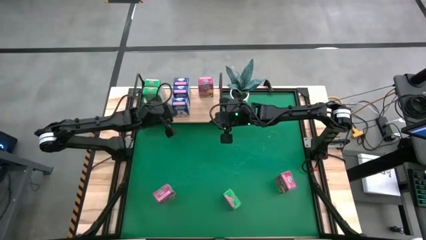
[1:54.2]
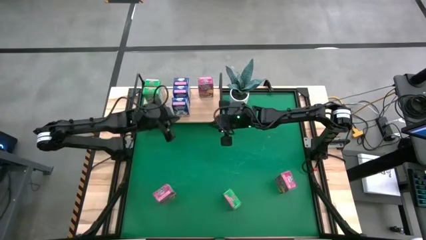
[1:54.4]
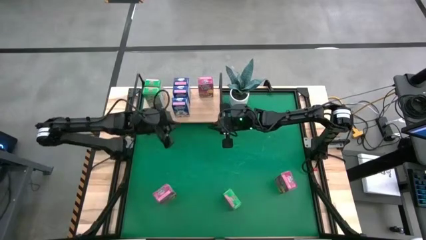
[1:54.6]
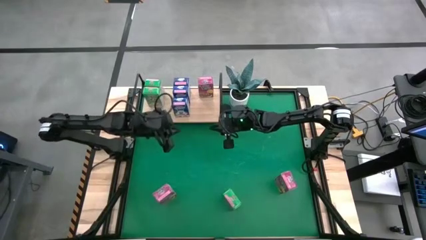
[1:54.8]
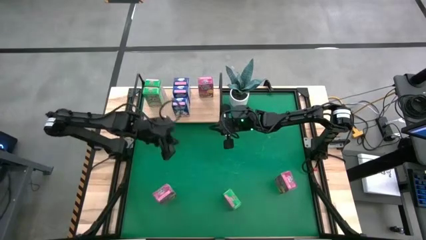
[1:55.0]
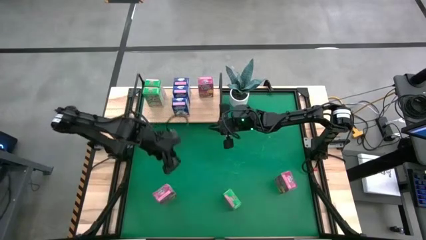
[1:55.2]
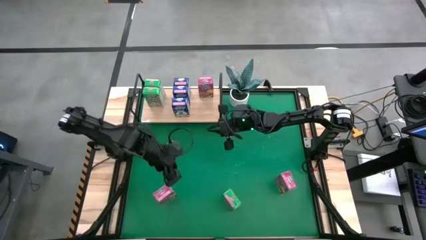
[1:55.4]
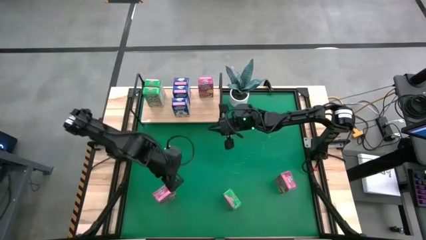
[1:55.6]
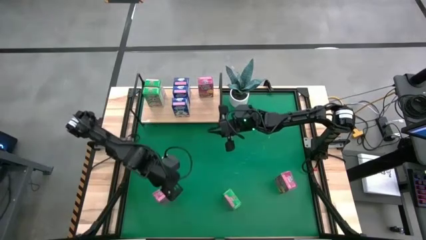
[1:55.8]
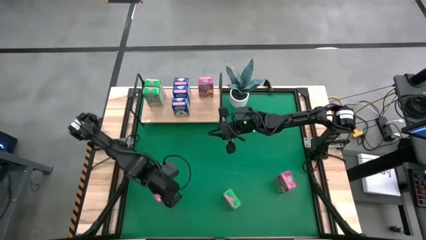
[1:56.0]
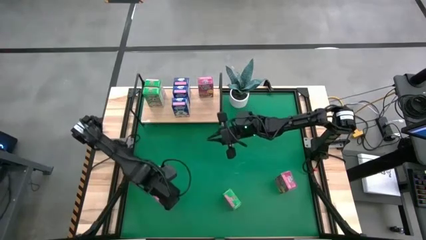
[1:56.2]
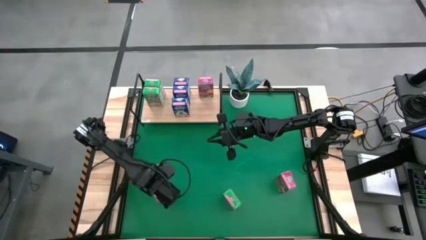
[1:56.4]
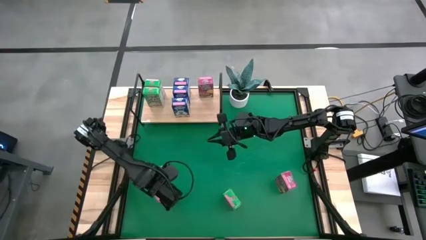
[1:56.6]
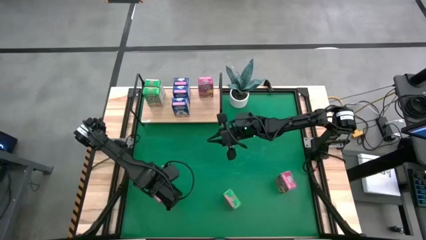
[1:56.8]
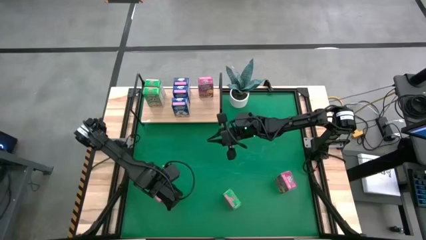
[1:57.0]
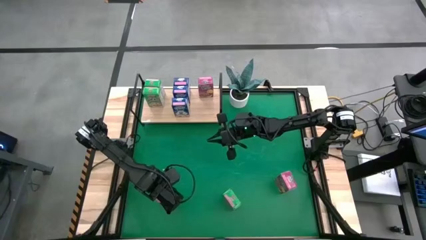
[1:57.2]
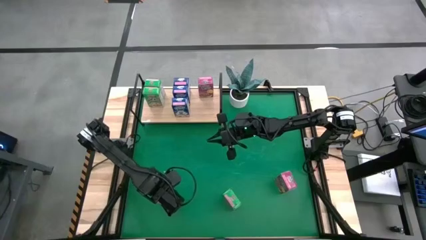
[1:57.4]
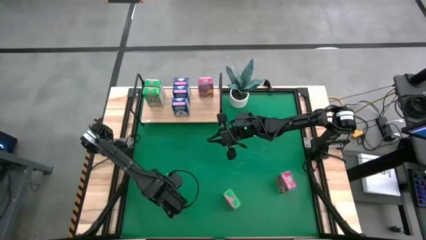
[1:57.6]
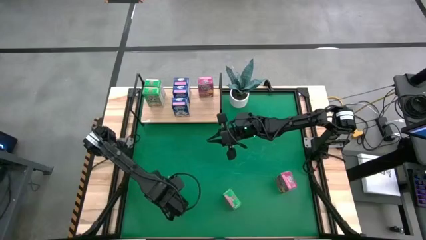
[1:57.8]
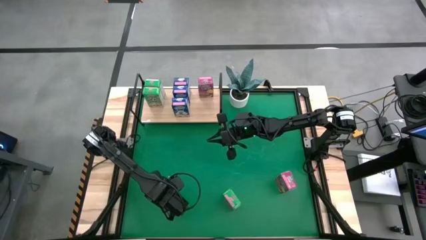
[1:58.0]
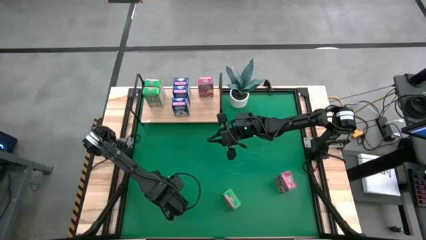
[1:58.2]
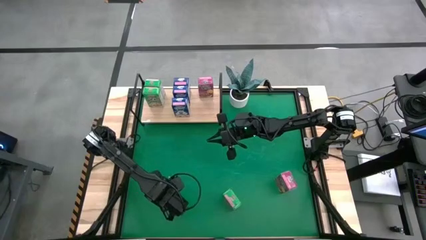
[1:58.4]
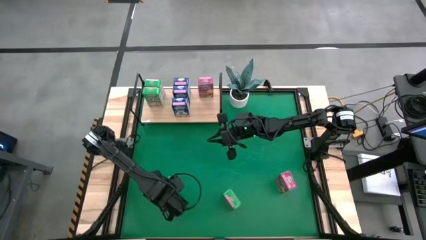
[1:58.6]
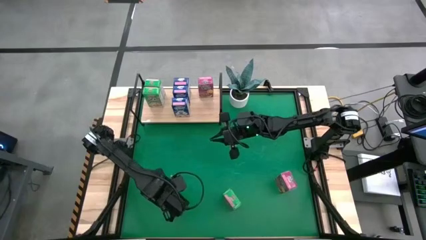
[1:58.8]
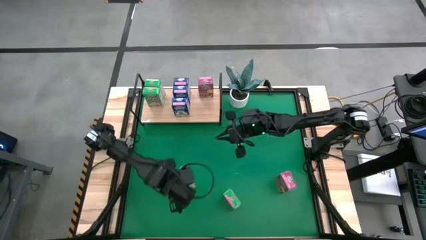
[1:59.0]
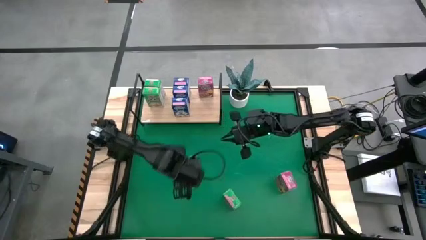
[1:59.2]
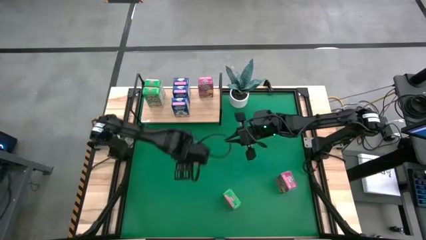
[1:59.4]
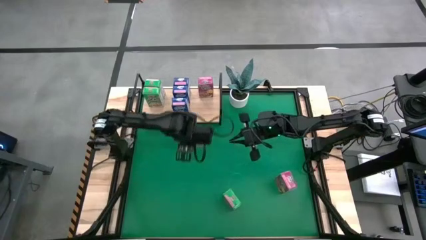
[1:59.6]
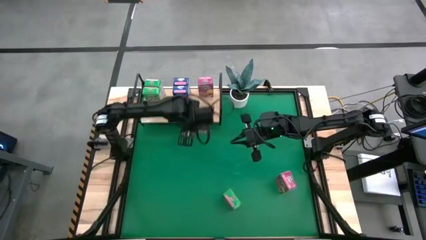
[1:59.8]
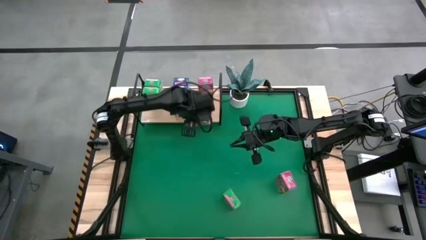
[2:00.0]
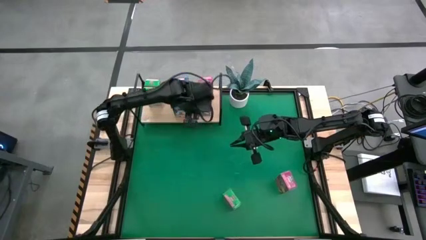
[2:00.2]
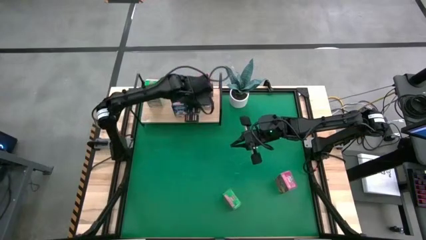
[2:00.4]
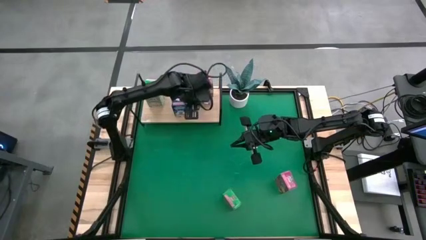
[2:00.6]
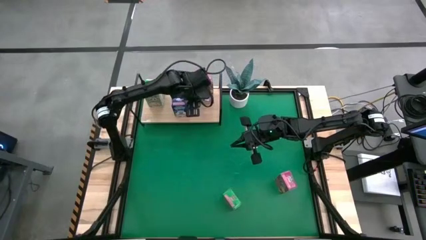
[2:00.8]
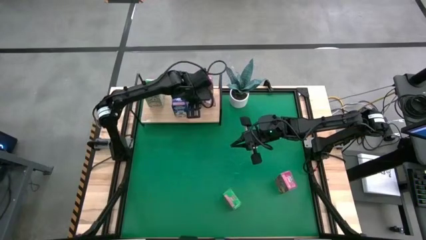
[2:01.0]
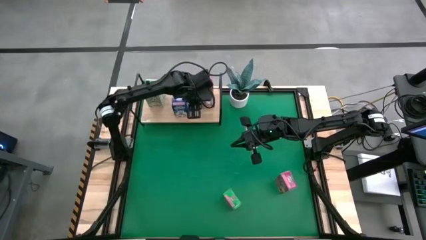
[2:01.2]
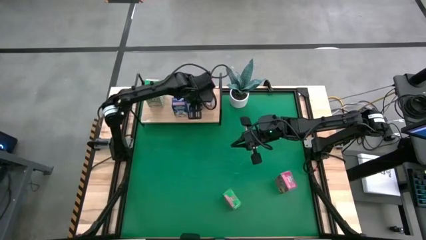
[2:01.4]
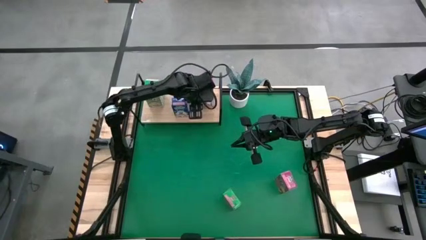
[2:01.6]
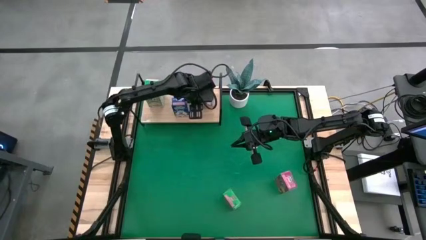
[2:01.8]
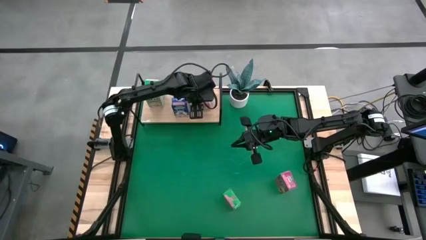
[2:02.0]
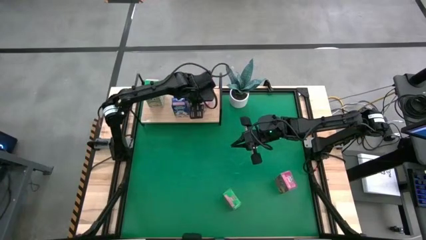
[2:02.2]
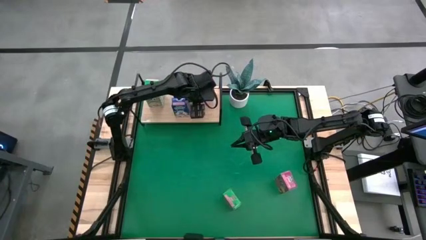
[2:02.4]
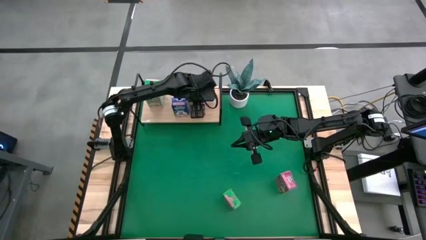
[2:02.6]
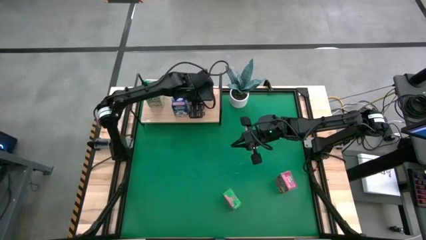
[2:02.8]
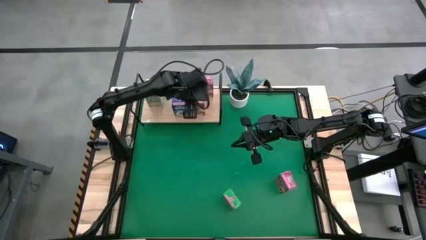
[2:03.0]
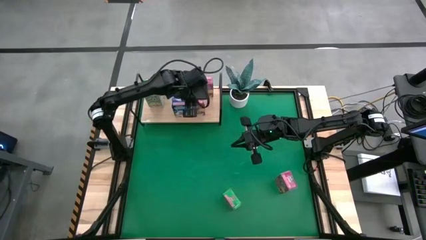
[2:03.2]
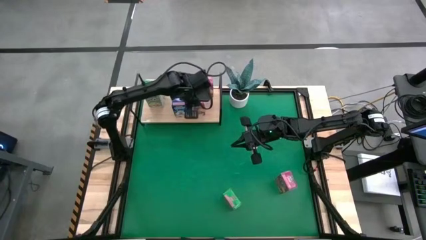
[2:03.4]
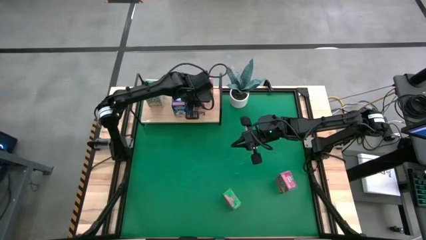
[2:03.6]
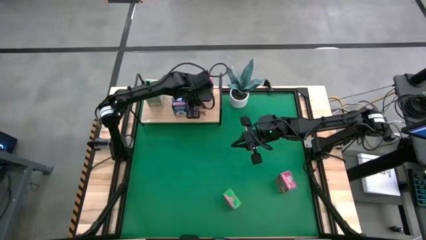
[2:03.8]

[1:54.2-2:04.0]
Task: Stack cereal on shelf
Put the left pink cereal box on the shelf aligned with the other pink cereal box
